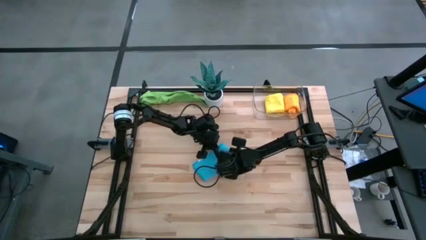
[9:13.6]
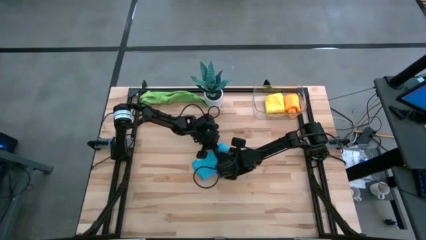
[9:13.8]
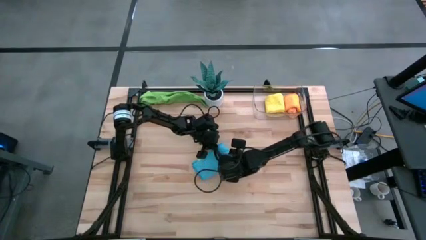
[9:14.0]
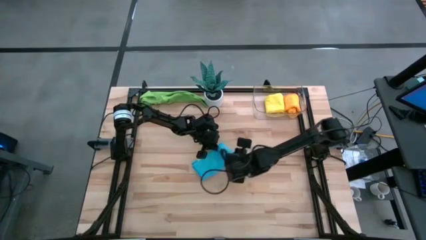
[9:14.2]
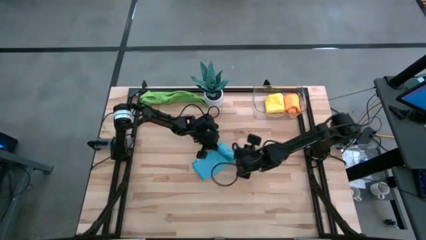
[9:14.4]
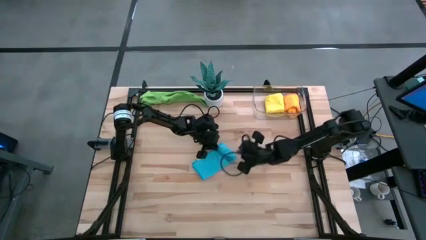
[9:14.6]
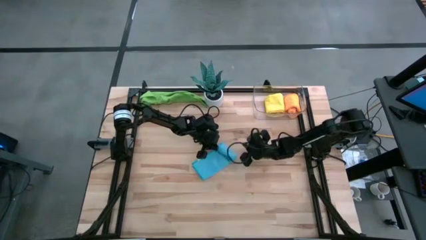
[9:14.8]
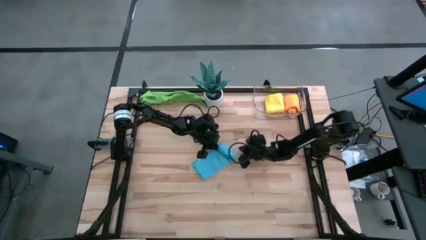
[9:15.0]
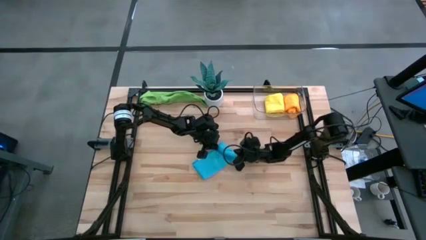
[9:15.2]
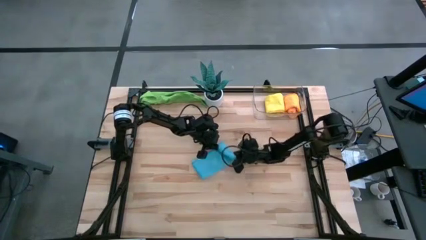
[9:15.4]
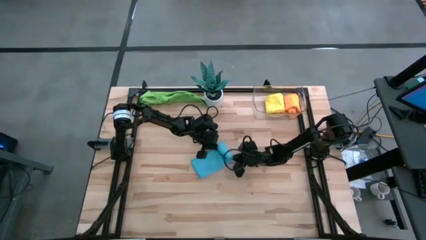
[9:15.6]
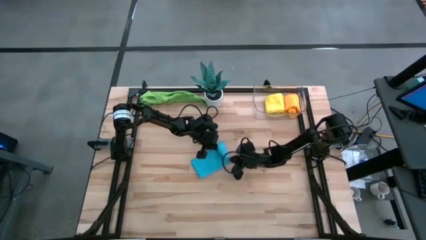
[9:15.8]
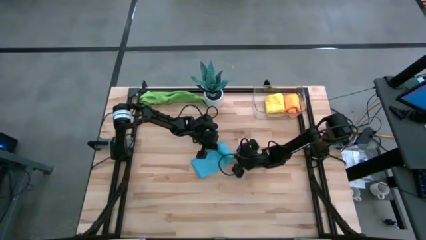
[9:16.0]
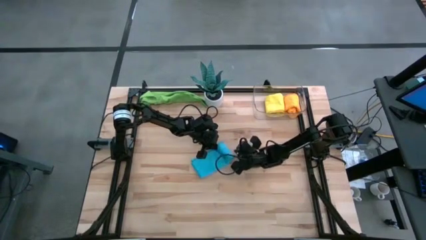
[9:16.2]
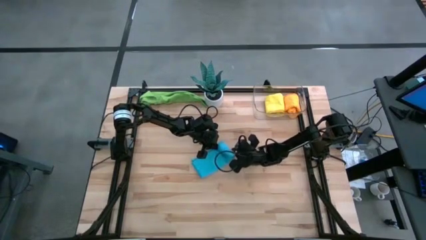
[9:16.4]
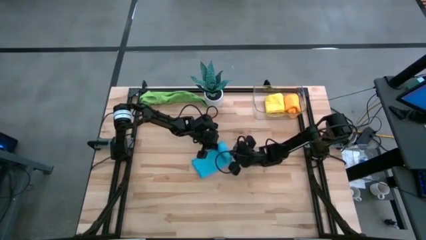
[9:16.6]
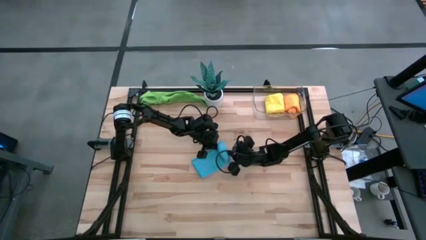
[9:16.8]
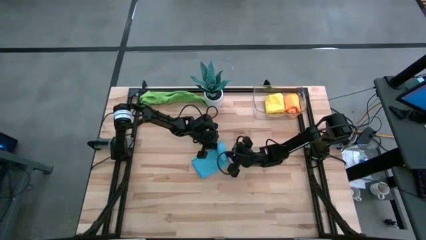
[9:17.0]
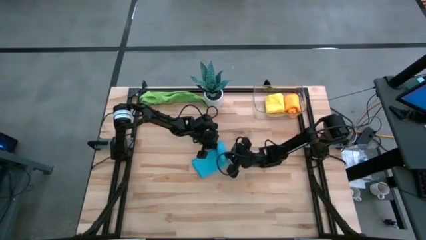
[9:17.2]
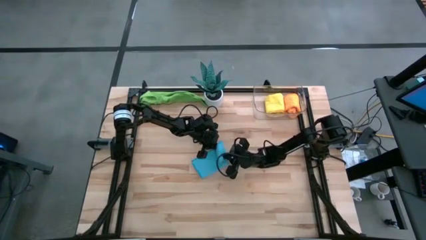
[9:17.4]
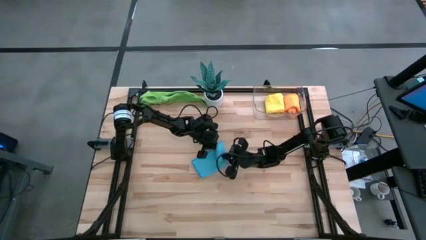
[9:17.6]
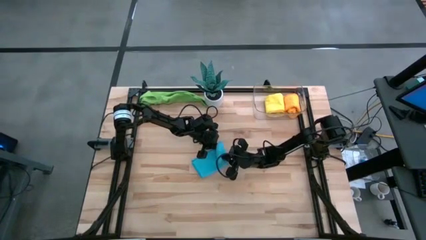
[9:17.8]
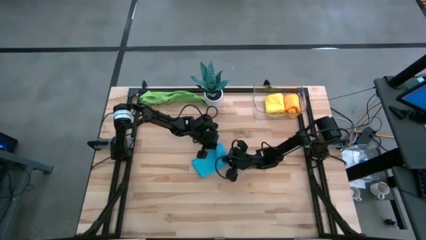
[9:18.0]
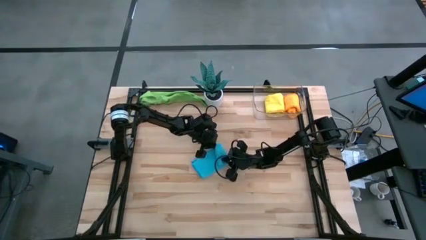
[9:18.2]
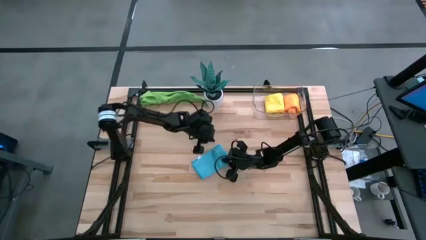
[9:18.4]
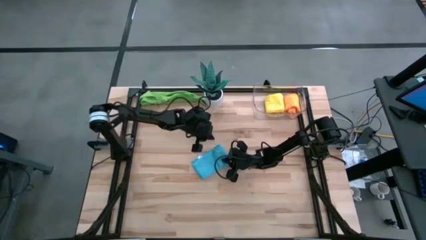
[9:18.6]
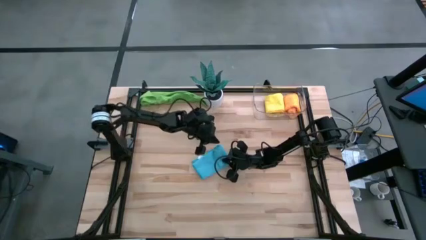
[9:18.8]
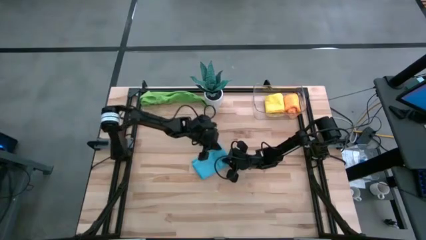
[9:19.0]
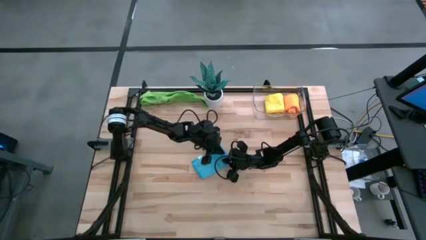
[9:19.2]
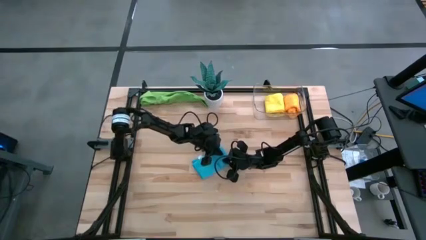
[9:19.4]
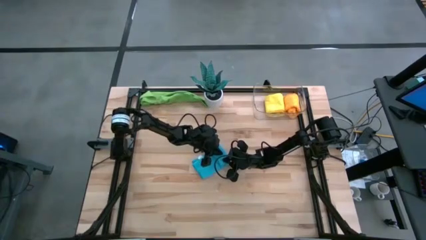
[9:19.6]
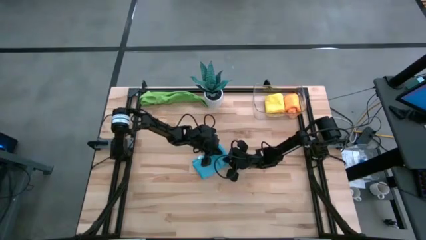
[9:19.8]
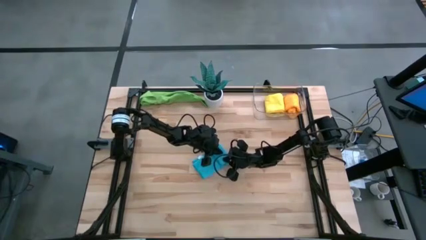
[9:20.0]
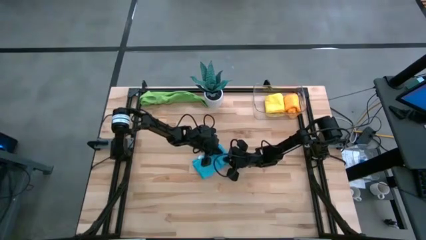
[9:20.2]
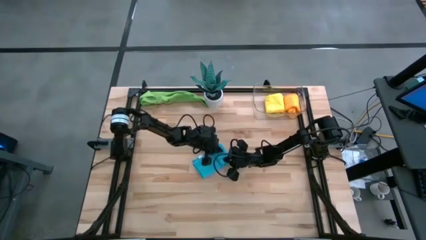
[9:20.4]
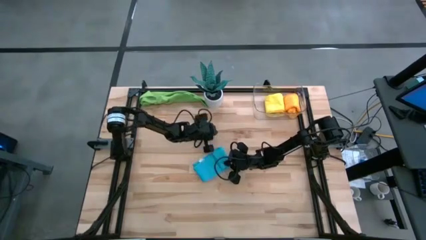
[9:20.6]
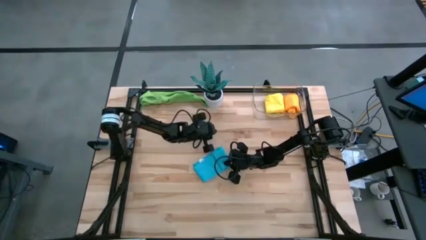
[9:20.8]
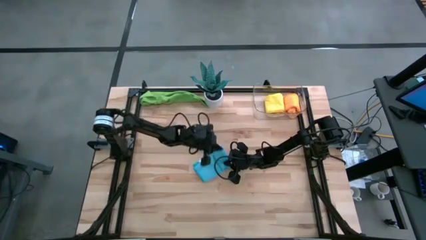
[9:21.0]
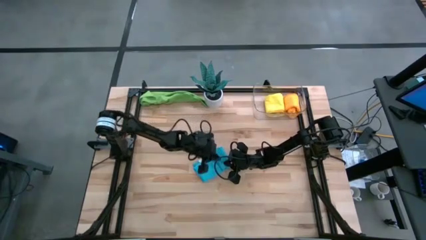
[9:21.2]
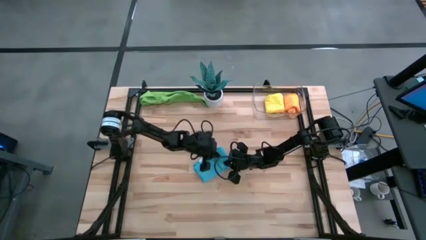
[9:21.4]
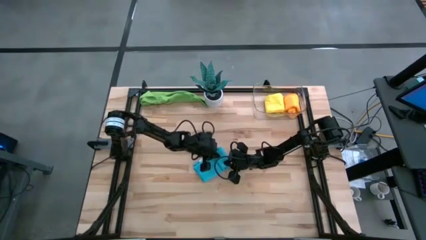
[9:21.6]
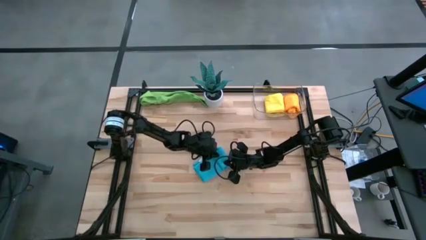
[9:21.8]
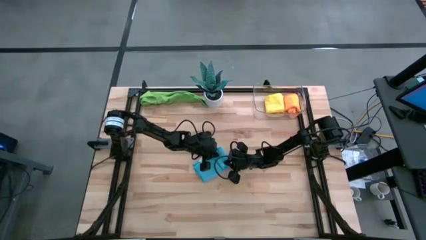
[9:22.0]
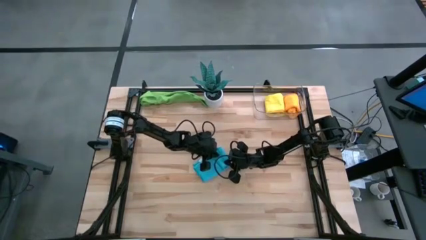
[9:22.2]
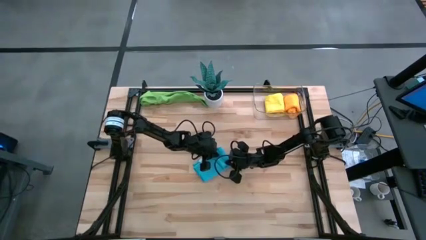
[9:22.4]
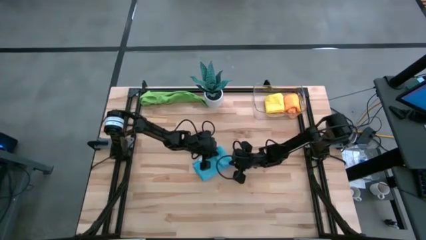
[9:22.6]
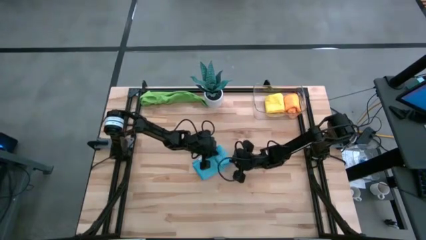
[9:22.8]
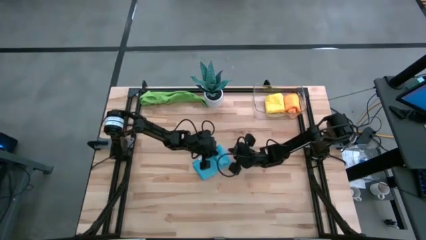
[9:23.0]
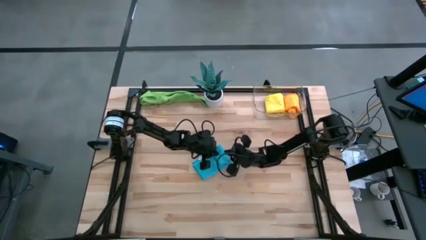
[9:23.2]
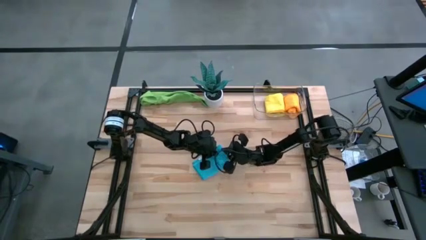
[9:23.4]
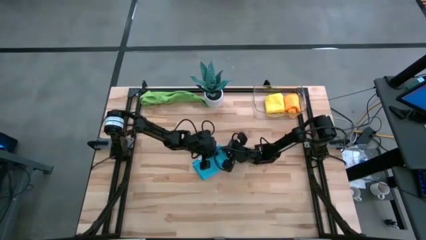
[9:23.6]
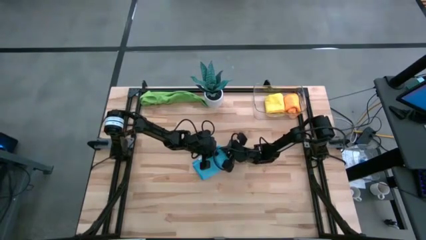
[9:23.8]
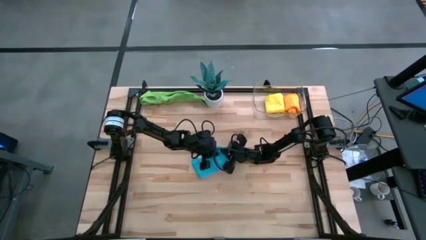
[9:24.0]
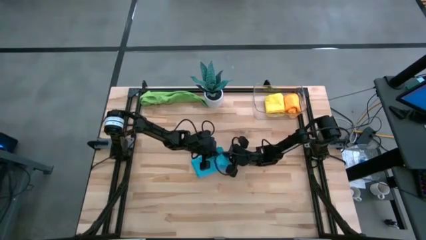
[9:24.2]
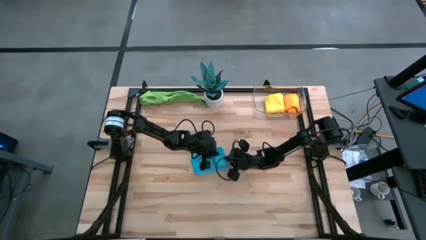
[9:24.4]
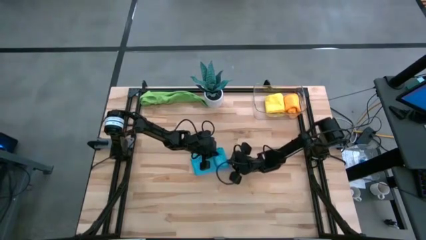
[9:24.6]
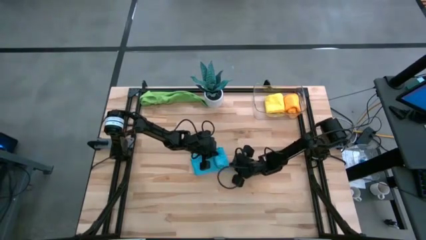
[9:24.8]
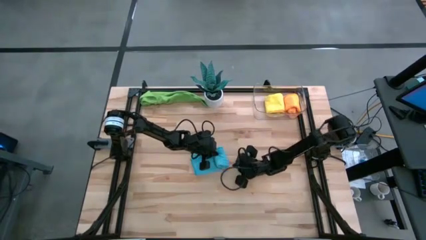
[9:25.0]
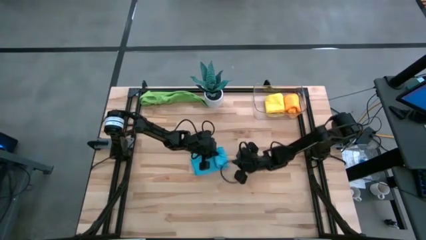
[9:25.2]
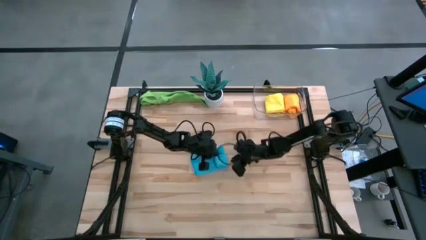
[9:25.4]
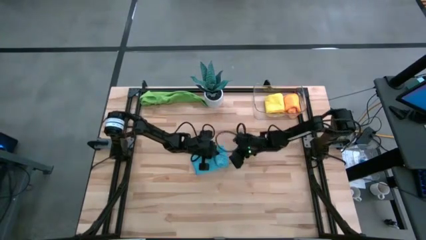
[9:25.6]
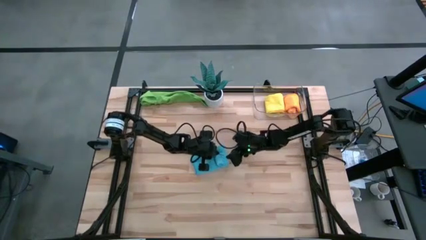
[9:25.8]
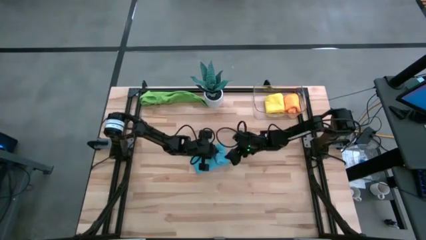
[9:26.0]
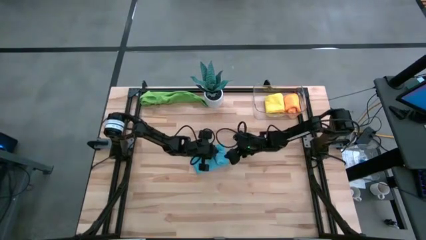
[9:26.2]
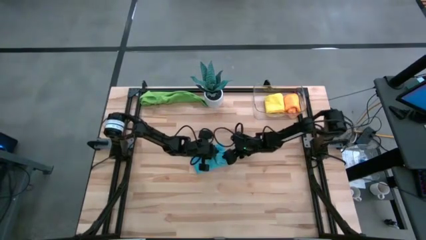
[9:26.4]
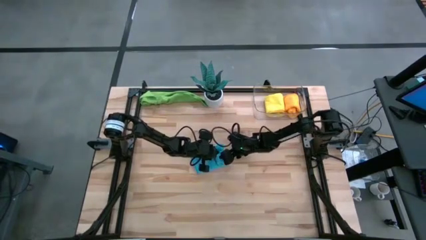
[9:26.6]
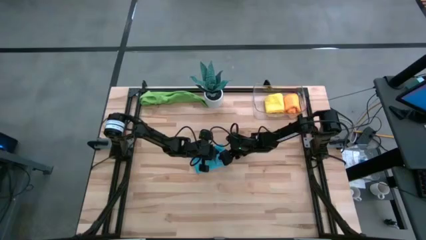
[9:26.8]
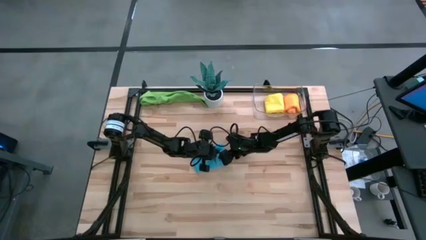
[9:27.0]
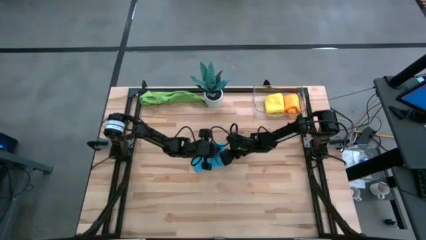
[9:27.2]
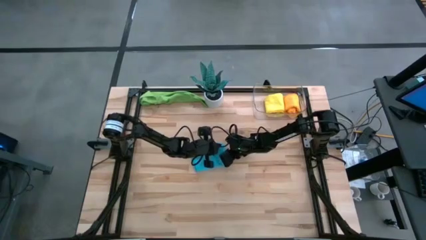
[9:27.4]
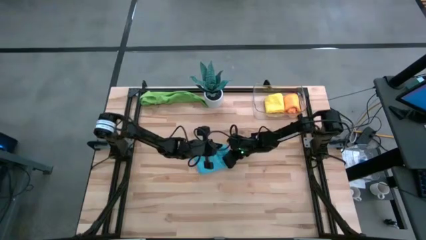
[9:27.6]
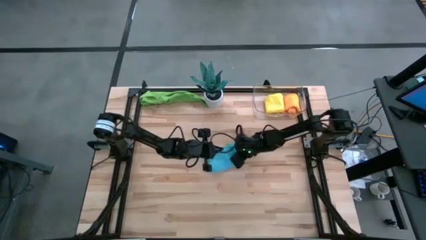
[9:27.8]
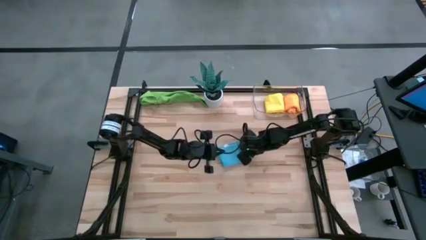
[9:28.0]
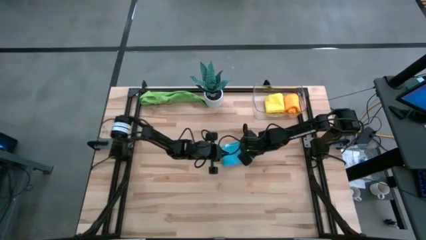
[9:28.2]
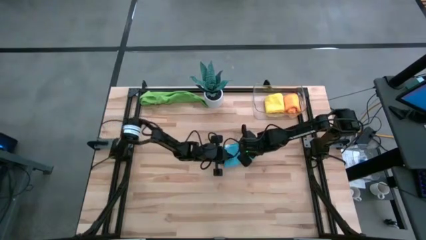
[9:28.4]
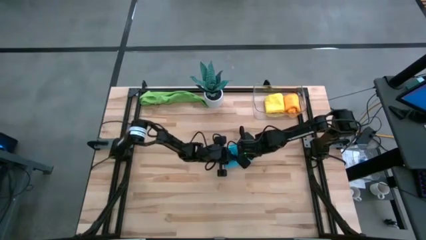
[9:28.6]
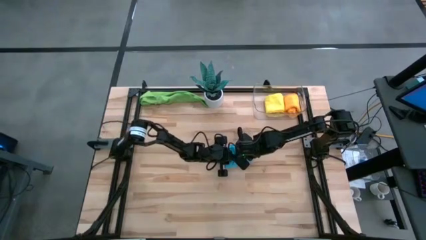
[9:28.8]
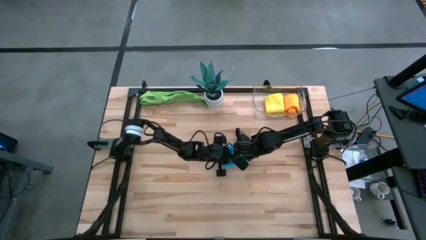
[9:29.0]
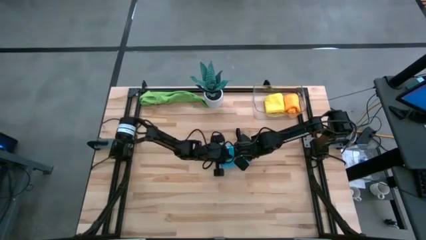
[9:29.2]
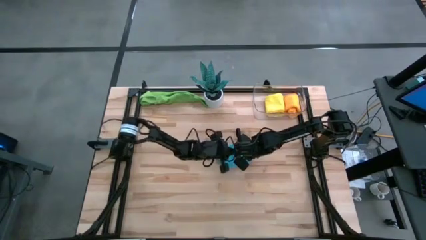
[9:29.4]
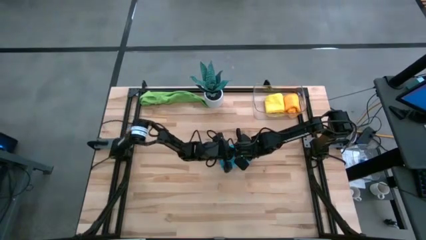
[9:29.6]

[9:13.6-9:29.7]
Task: Roll microfiber towels into tight, uniform cylinder then place into a basket
Roll the blue microfiber cloth
